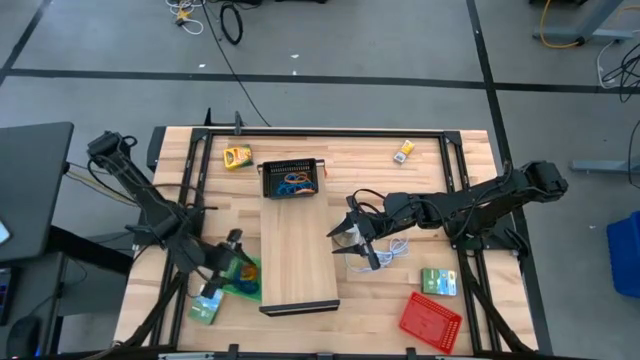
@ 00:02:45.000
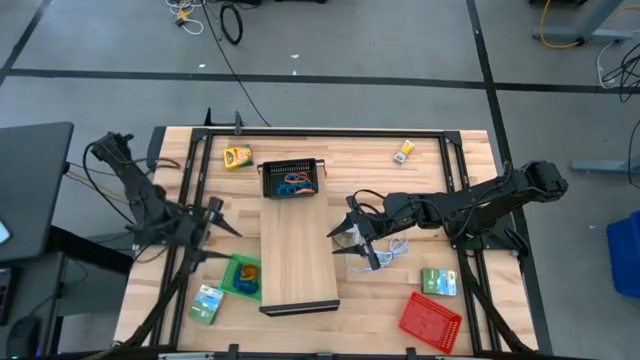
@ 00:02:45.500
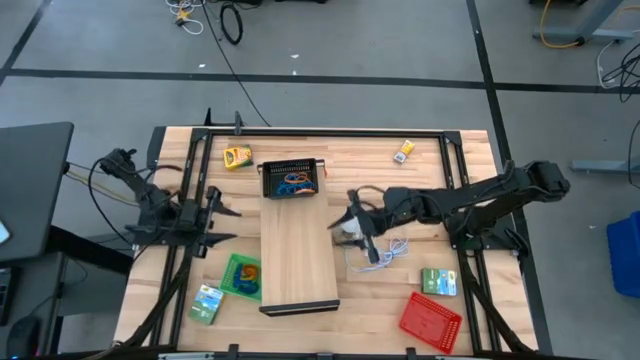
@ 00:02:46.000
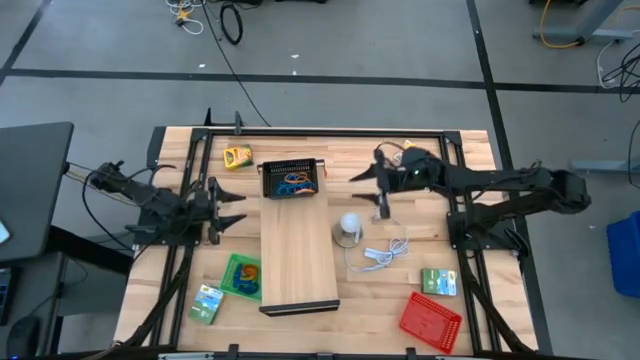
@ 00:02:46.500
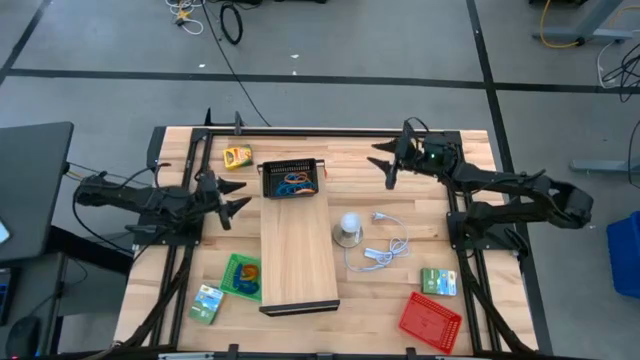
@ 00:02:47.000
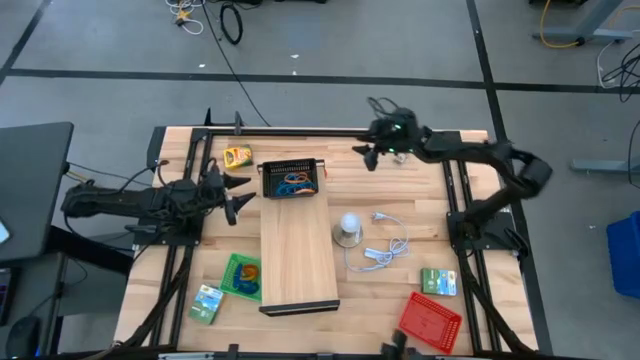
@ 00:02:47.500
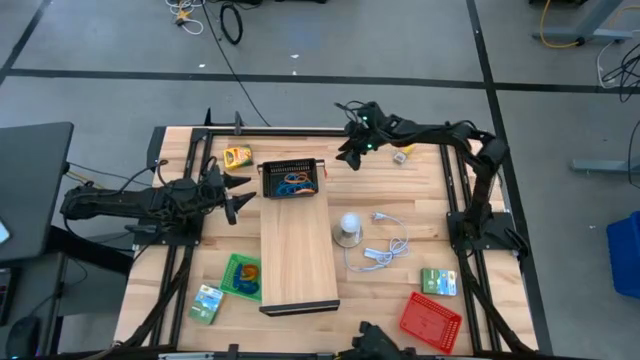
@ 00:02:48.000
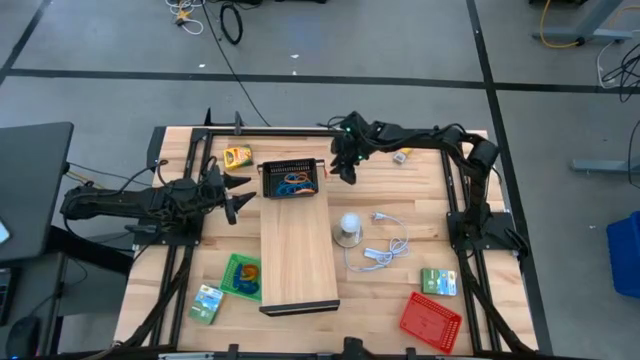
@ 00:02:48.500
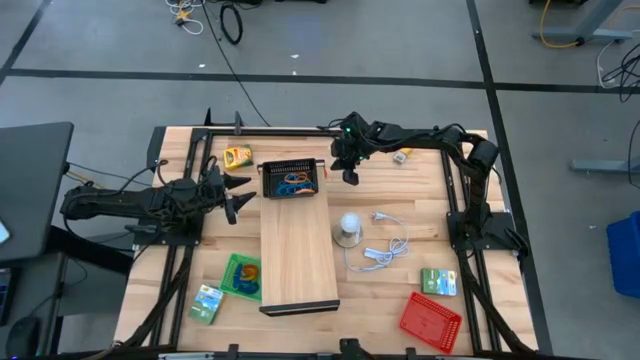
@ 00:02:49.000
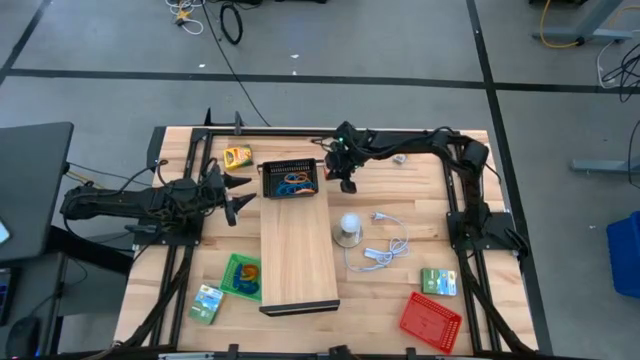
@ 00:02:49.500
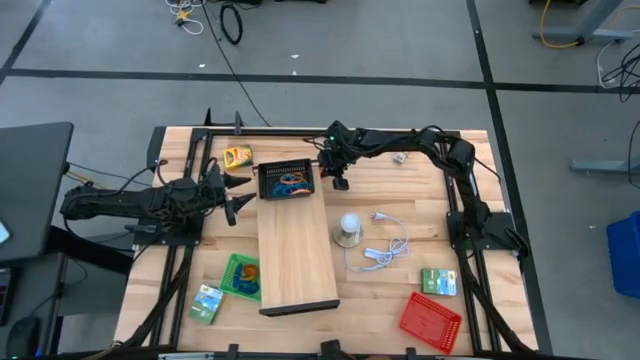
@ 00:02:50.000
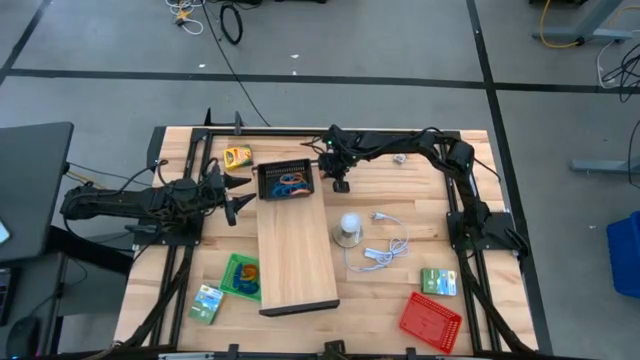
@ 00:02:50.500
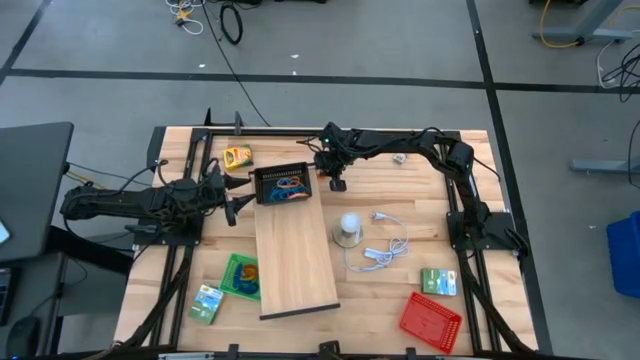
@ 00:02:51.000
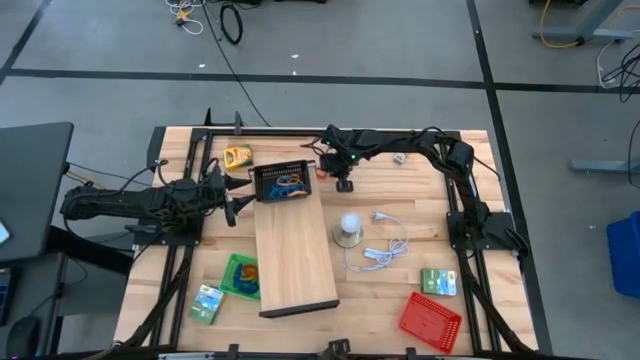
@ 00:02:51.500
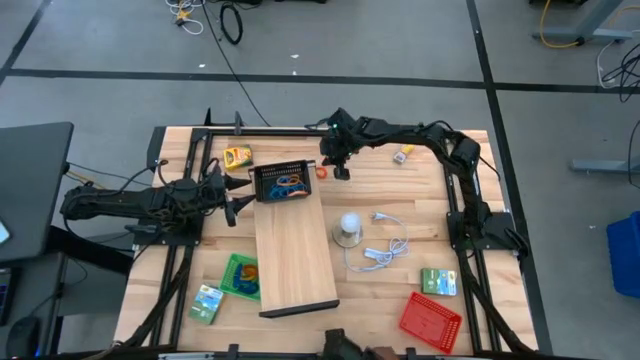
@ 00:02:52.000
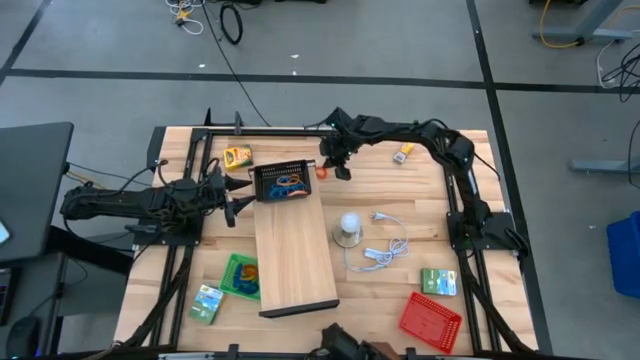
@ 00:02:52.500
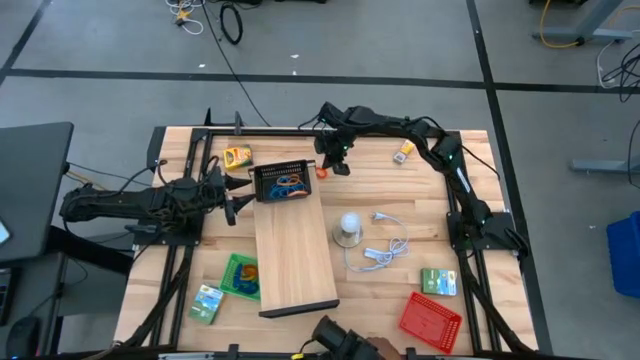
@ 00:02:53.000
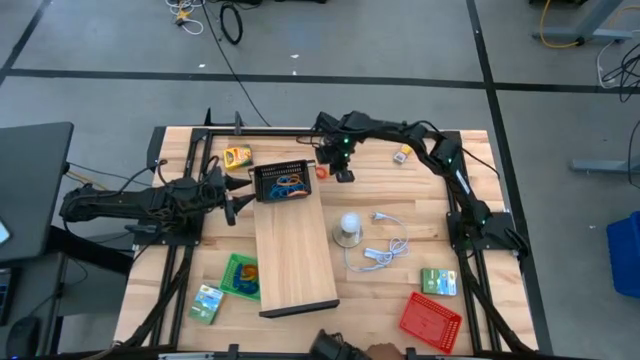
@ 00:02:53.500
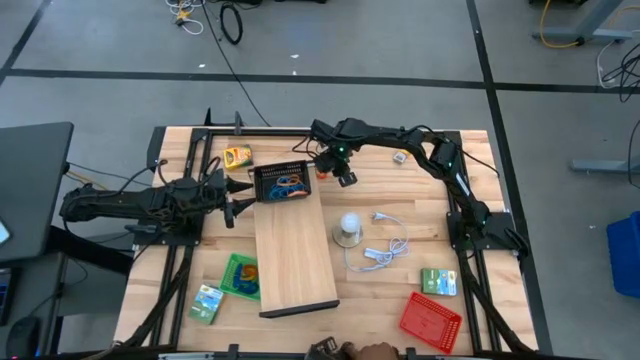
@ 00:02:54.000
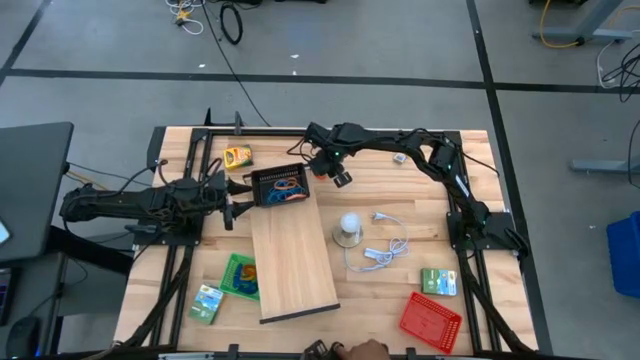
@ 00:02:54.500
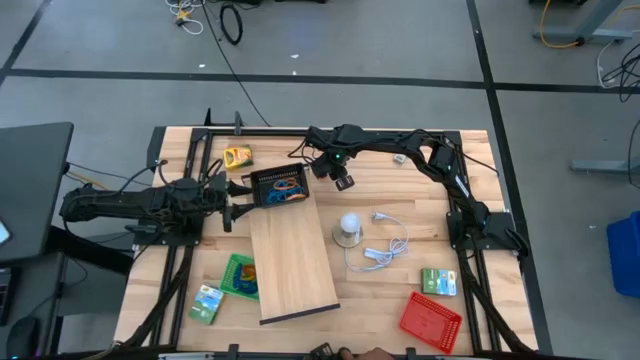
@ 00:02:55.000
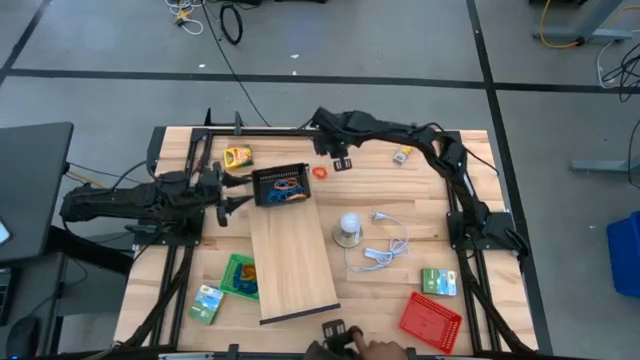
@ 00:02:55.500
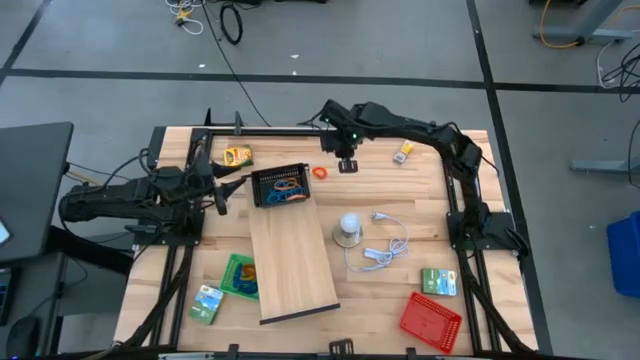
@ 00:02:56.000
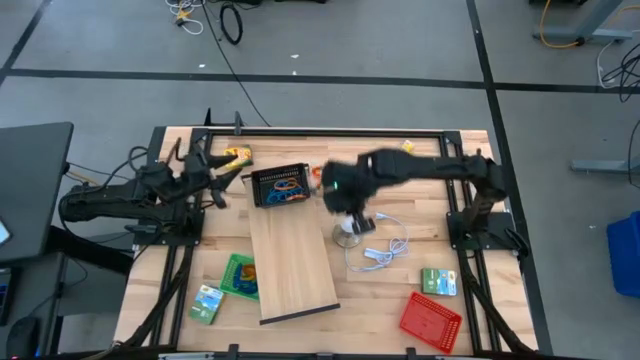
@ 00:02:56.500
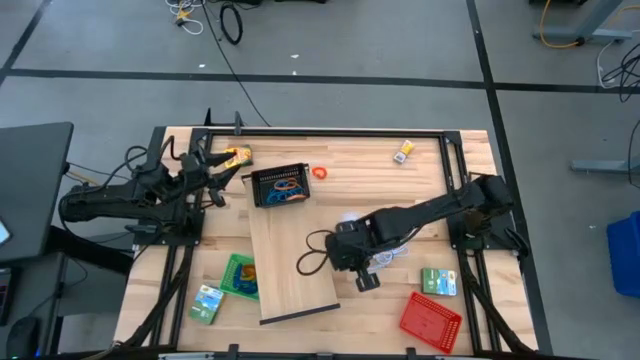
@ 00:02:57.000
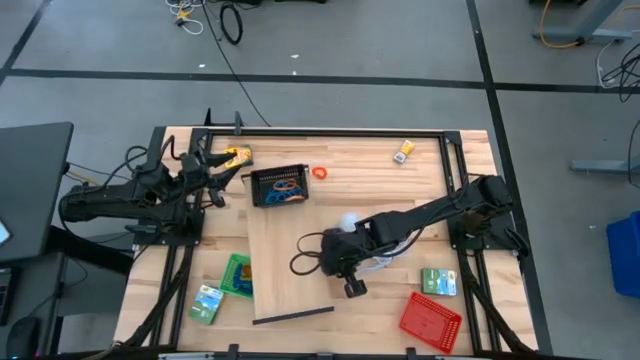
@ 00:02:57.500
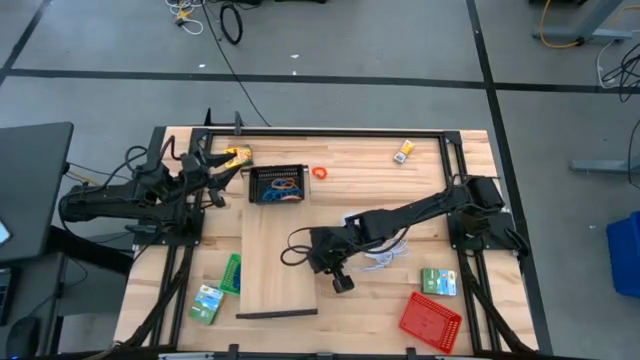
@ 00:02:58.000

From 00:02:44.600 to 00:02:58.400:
Task: Pick & Place Office Desk Supplies
Adjust the shelf

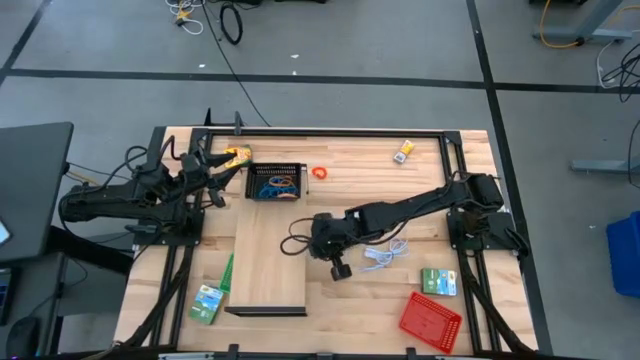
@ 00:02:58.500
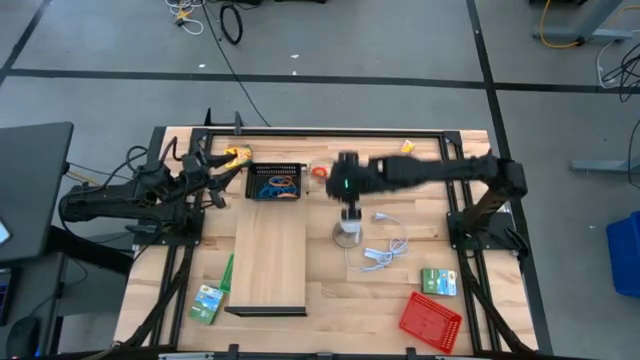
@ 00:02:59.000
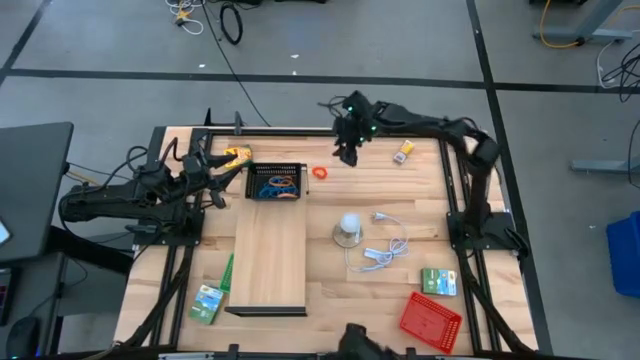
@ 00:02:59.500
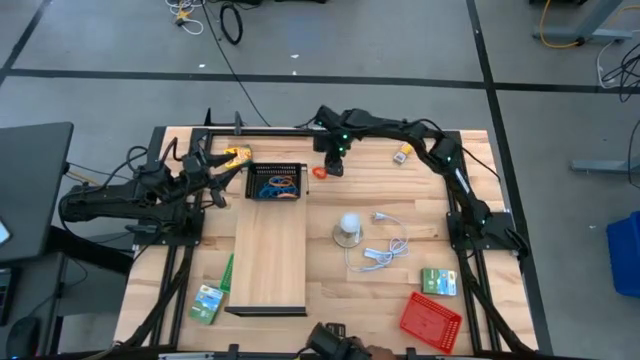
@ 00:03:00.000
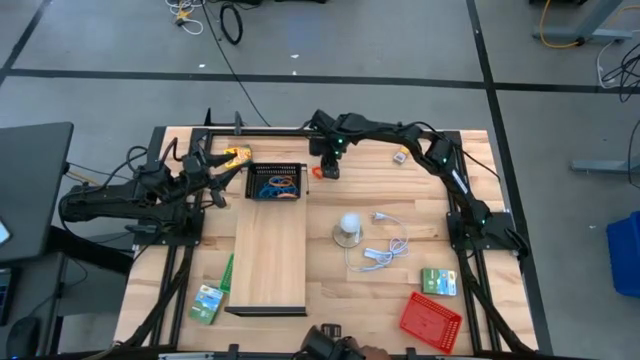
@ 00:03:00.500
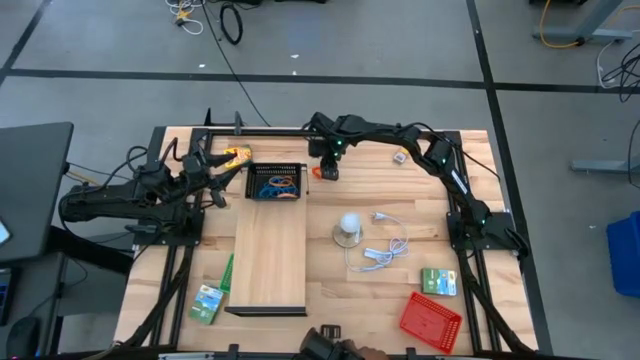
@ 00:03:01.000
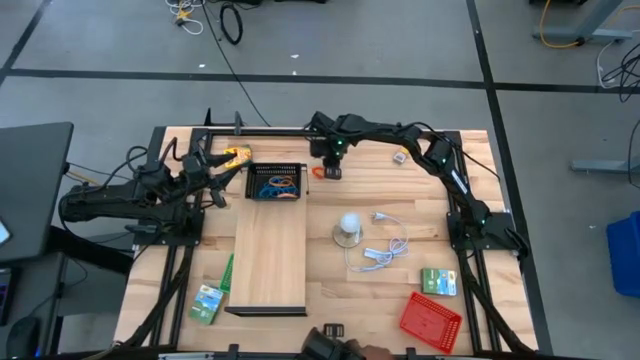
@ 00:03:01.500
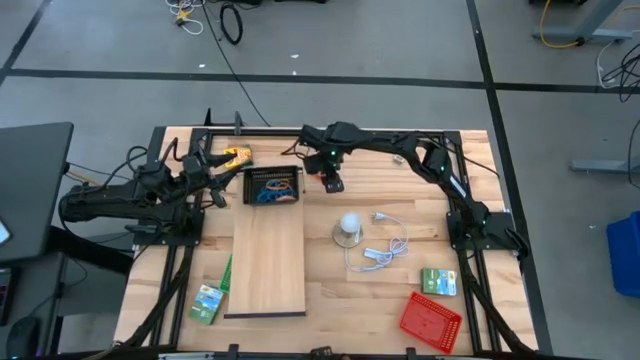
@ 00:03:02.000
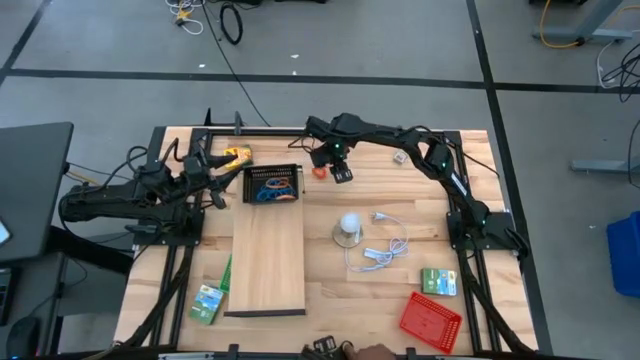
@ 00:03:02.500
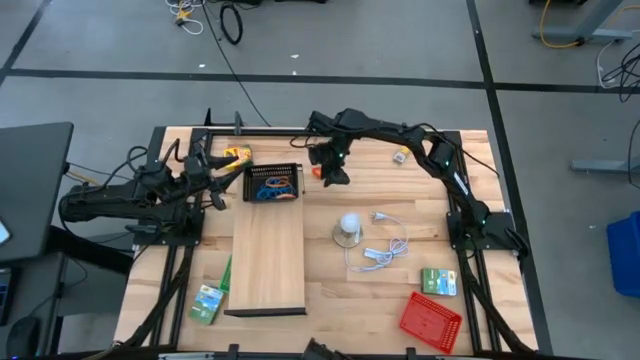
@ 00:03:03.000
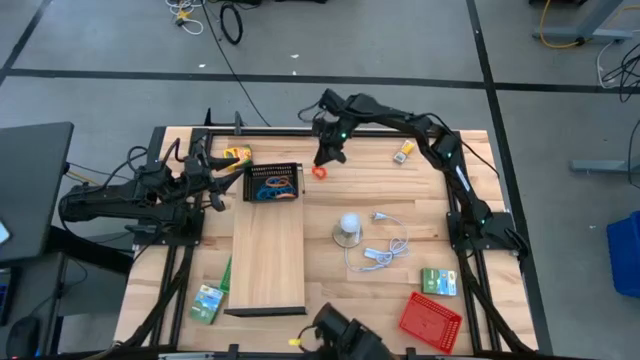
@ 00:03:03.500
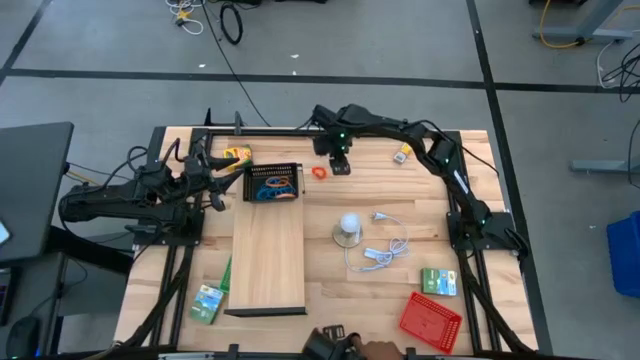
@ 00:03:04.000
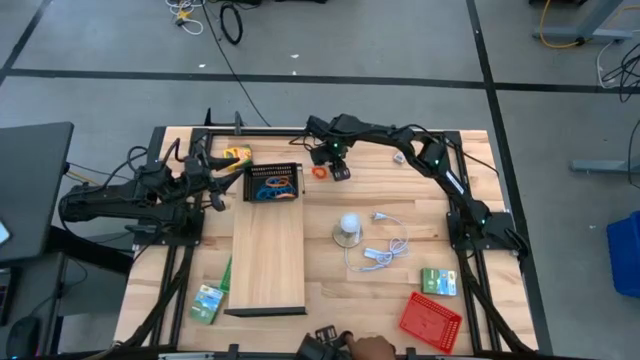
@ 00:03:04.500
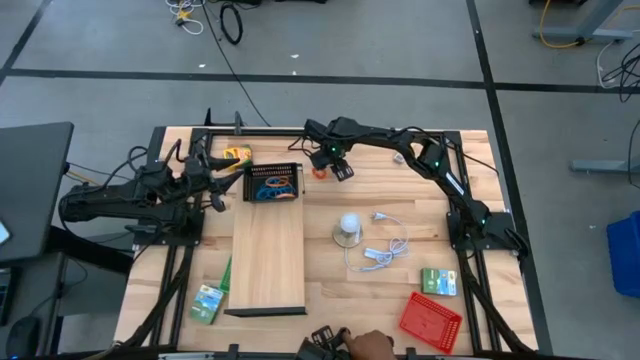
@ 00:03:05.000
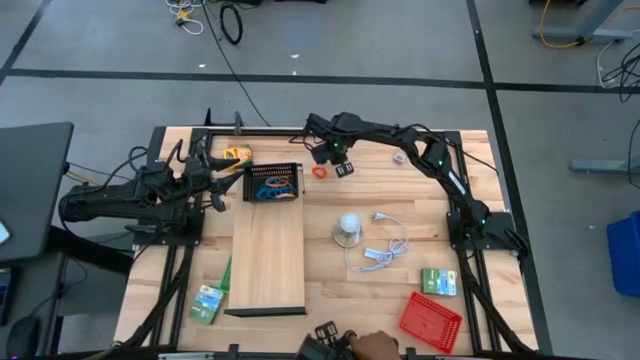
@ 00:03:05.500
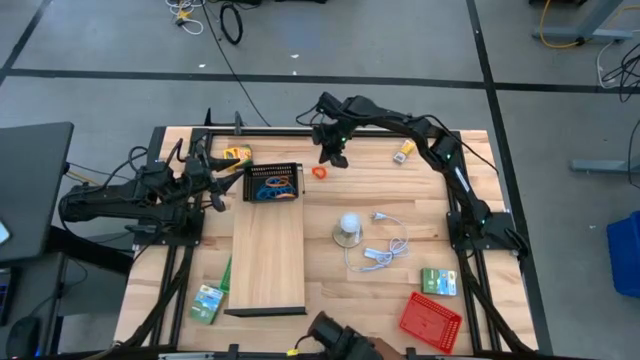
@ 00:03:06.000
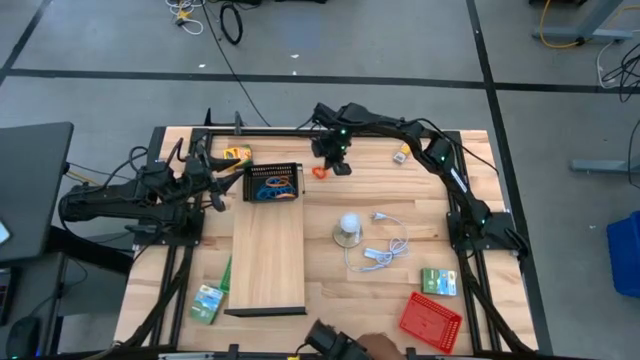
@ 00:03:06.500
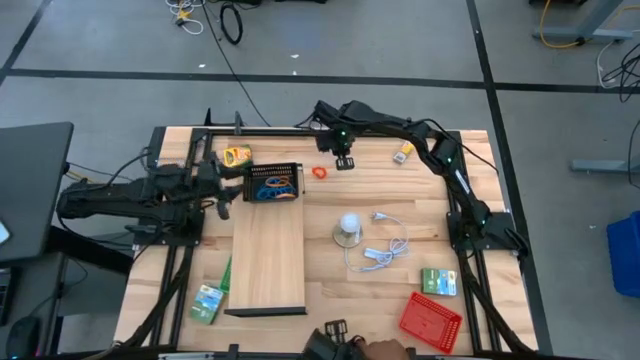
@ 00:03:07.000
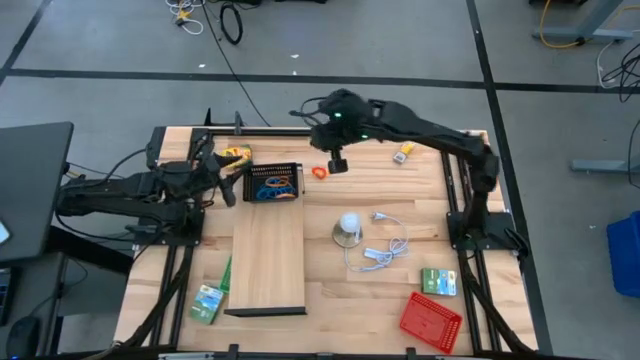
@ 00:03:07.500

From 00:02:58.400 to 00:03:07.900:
Put the orange spiral keychain into the green bin
